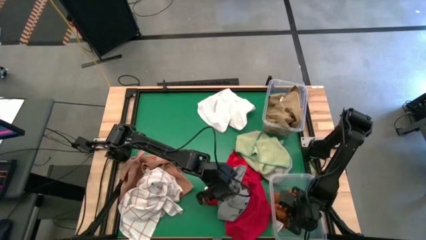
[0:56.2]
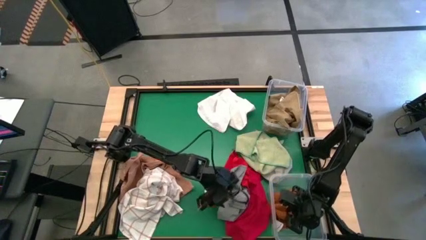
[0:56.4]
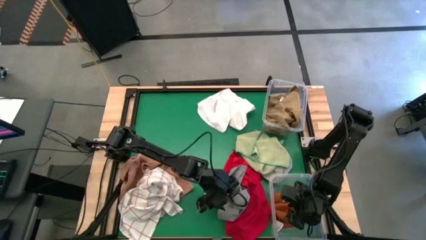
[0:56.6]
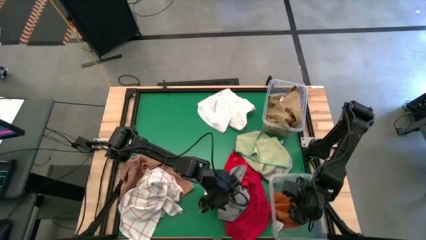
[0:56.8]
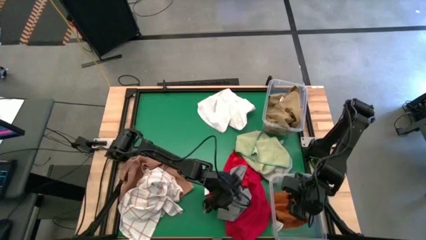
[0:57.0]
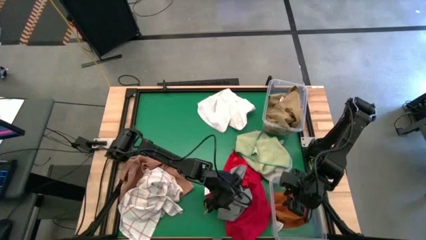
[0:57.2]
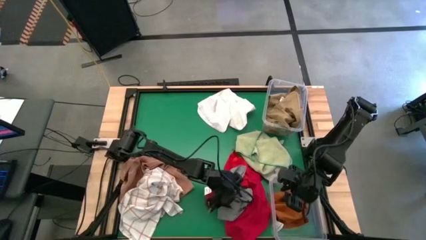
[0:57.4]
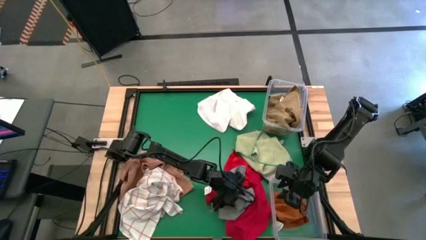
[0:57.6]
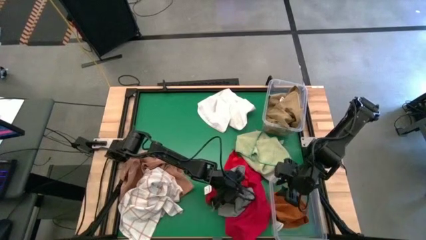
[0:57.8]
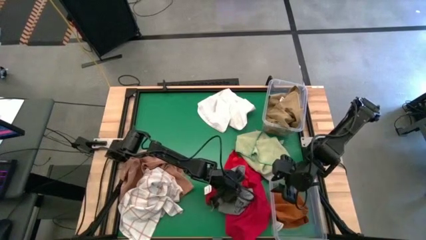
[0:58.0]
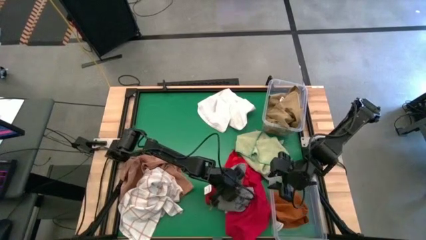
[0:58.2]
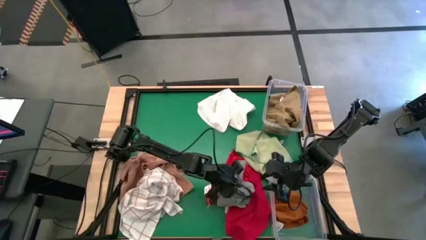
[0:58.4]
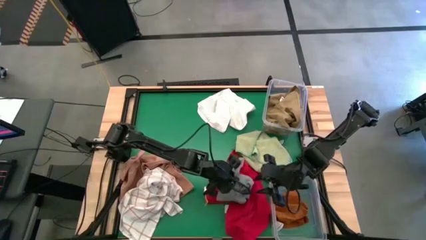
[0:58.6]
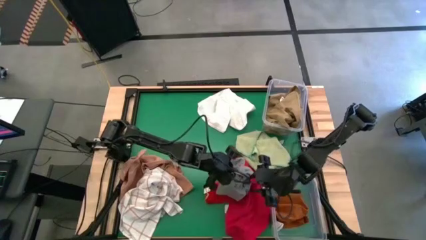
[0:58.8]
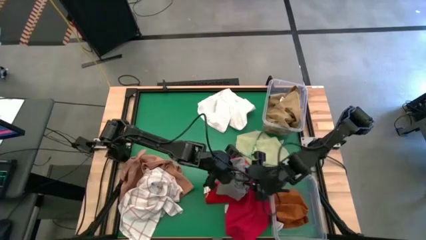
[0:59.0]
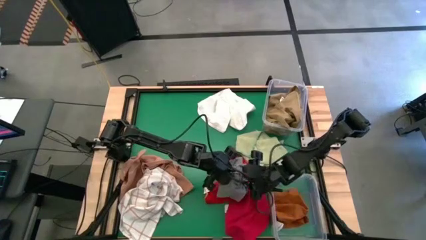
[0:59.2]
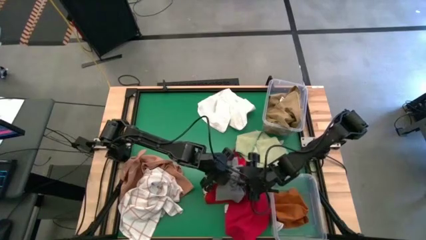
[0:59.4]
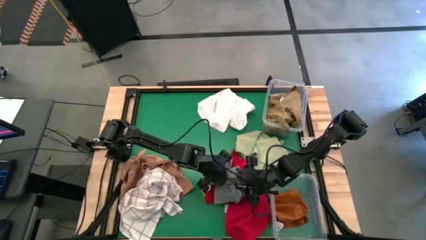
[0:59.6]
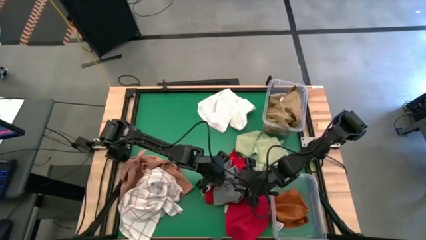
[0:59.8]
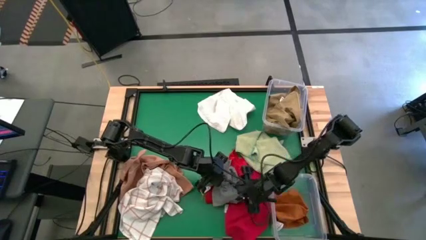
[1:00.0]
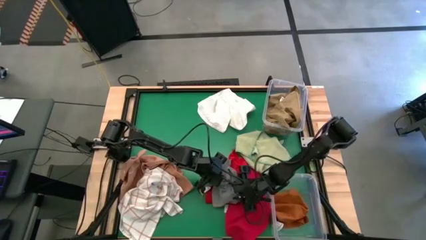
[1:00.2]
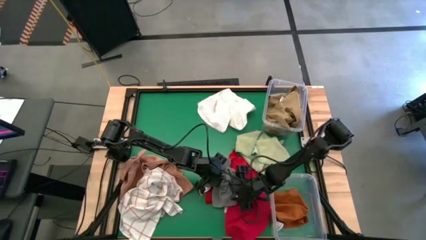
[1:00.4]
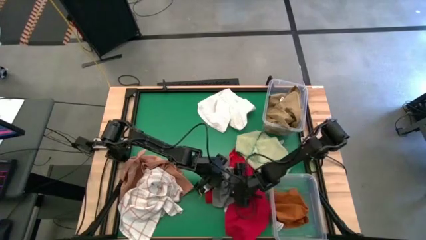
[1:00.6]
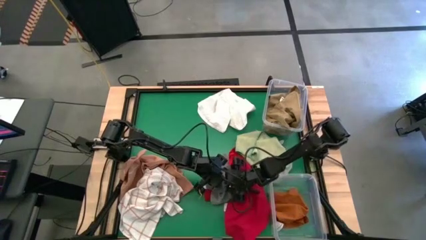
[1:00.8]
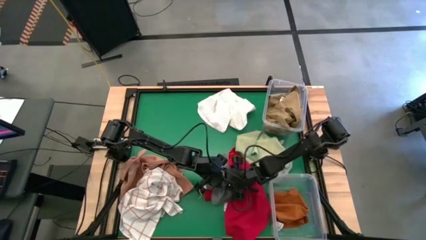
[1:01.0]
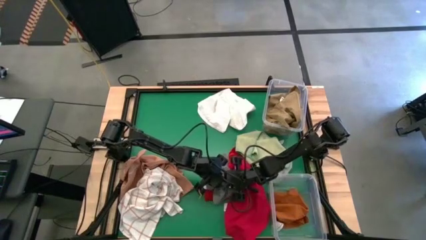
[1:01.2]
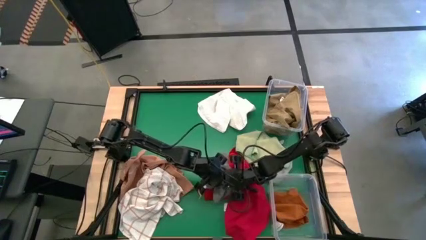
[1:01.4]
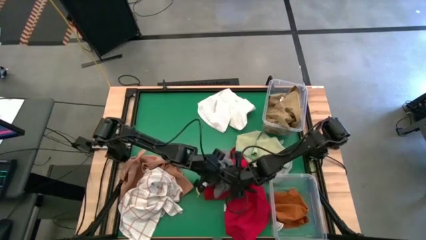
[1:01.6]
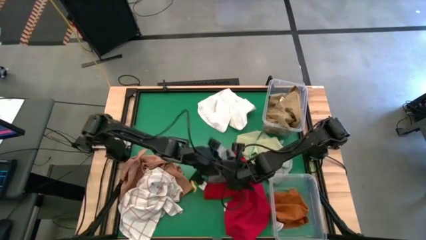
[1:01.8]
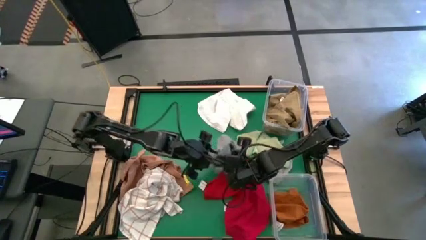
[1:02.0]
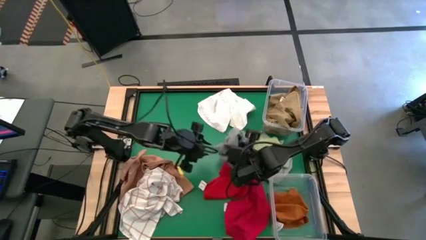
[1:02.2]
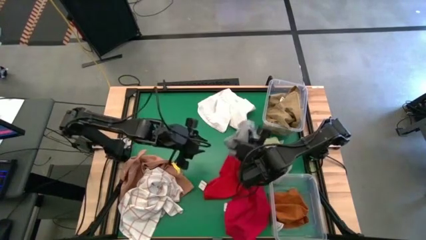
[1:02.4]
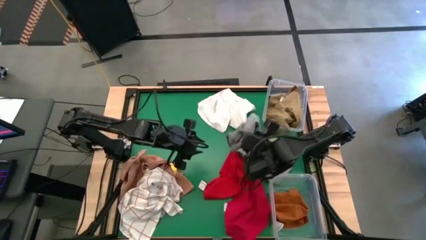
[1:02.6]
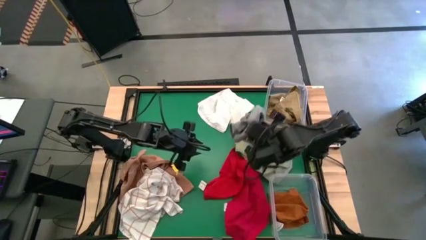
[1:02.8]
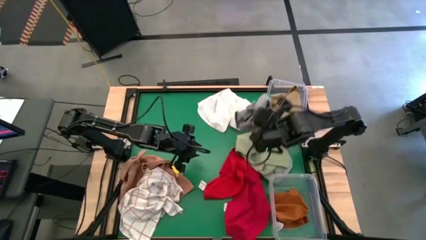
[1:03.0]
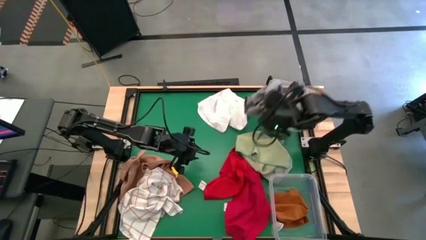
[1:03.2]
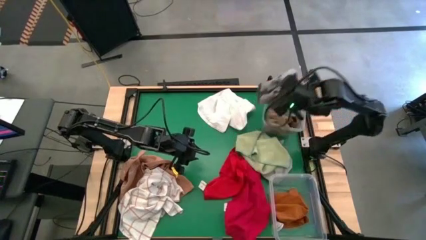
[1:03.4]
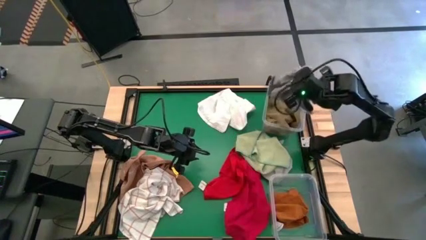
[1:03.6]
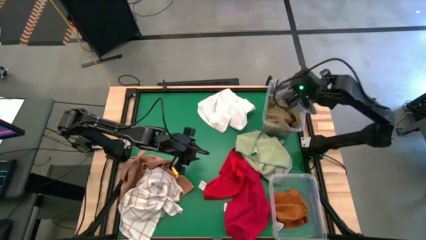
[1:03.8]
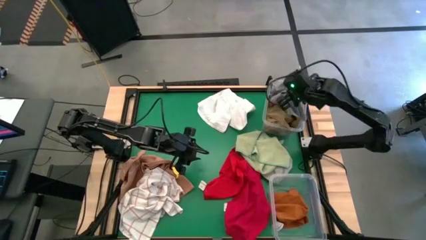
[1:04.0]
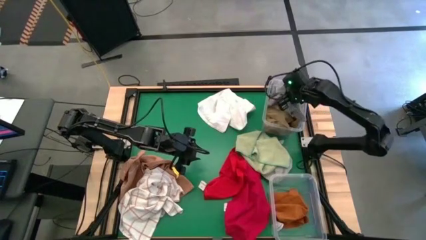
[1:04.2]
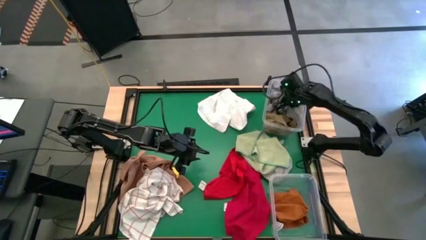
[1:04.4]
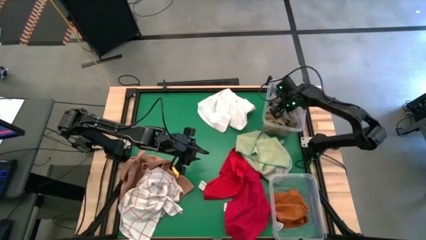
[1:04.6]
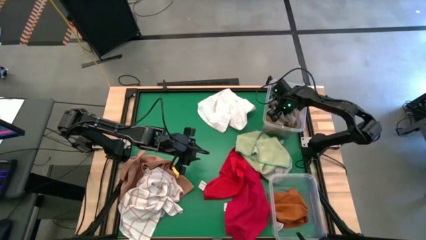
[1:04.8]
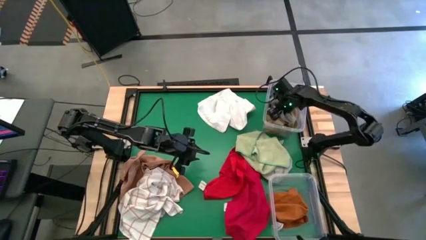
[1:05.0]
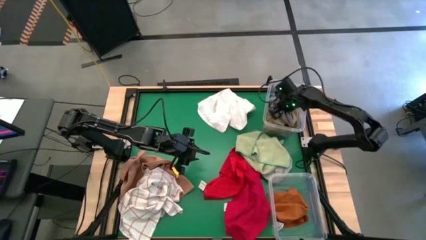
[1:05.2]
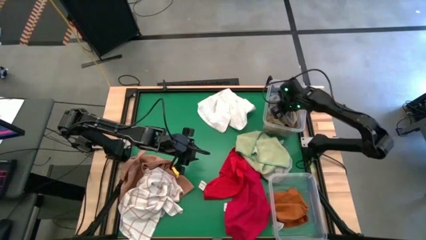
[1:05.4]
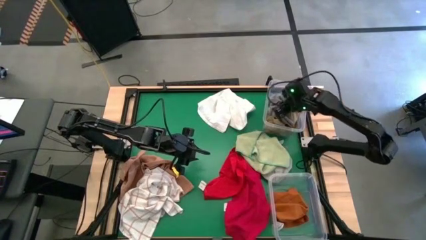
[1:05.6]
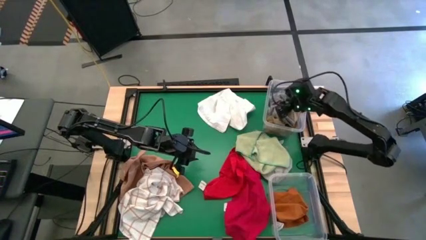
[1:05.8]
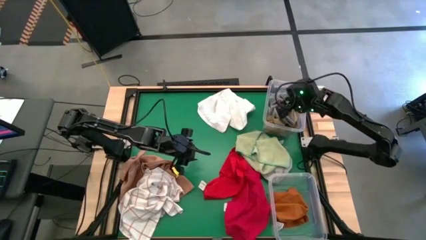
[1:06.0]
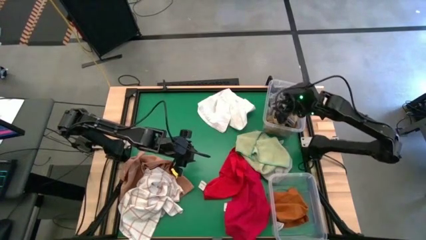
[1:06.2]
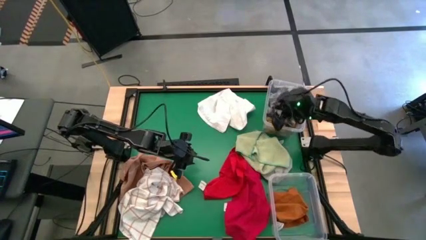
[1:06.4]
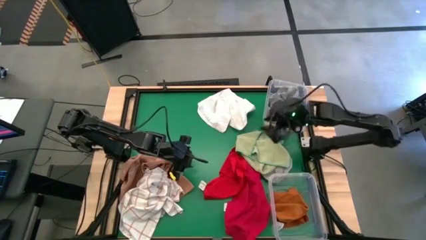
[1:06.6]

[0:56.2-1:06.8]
Task: Sort towels by color in basket
Put the left gray towel into the top transparent bin

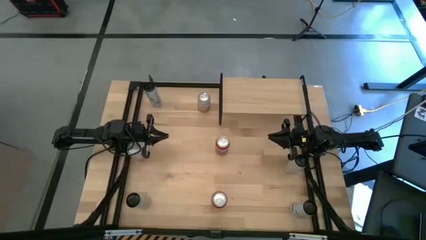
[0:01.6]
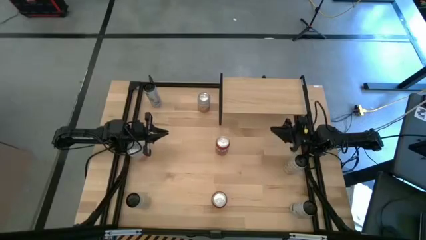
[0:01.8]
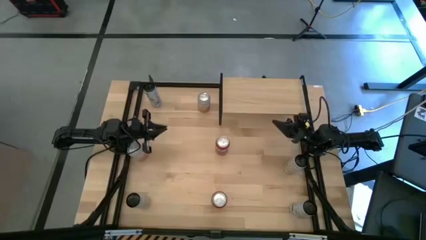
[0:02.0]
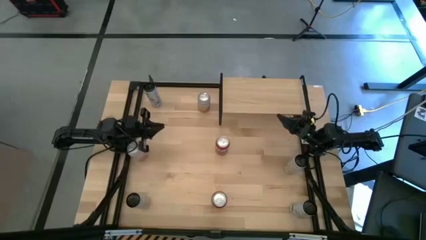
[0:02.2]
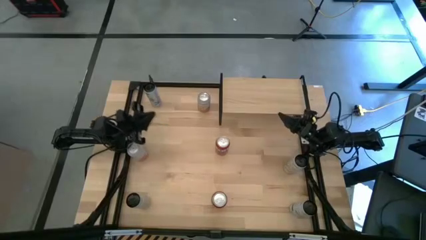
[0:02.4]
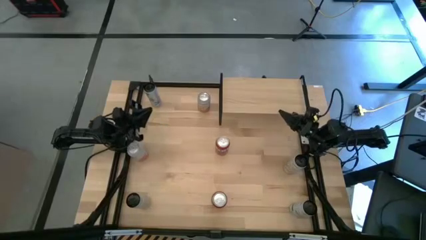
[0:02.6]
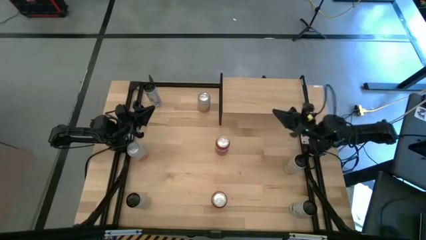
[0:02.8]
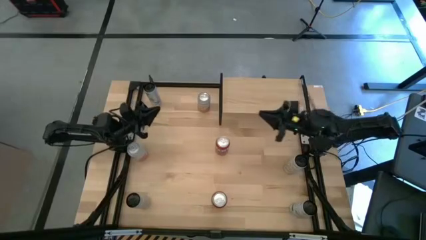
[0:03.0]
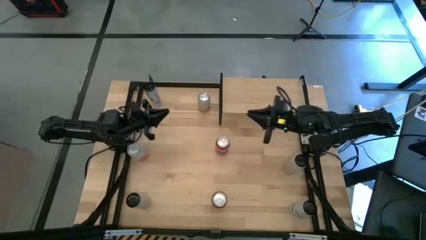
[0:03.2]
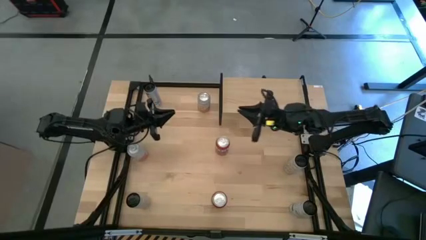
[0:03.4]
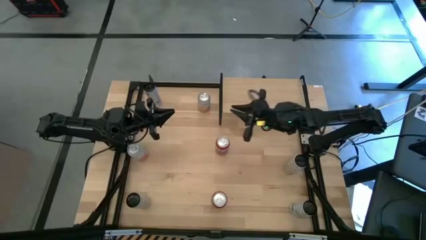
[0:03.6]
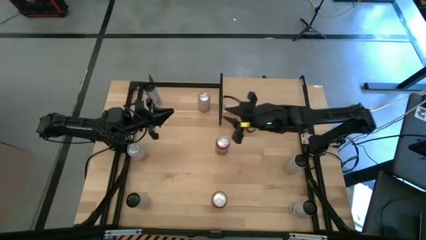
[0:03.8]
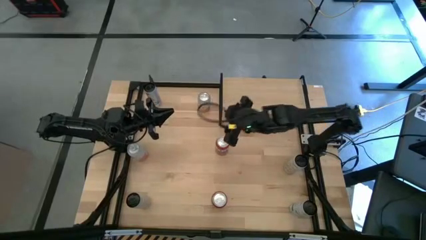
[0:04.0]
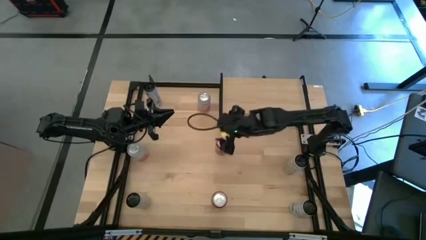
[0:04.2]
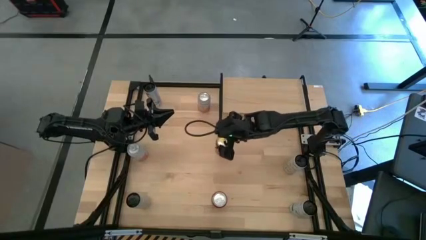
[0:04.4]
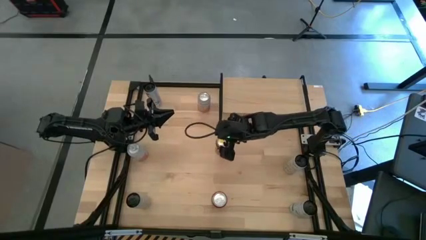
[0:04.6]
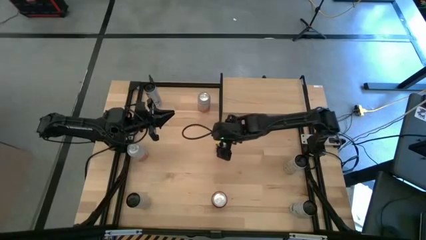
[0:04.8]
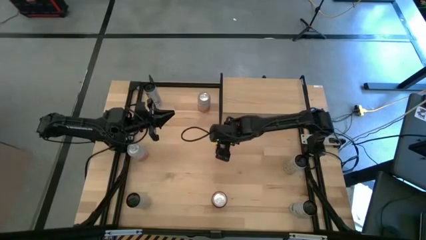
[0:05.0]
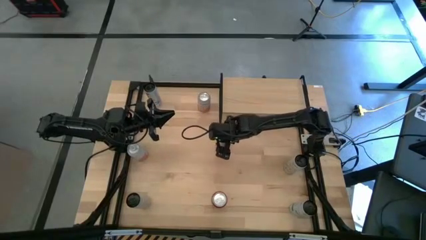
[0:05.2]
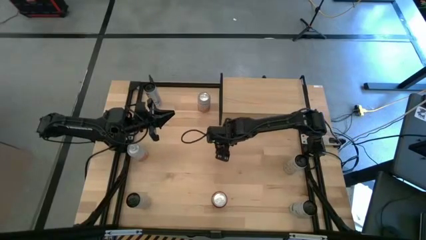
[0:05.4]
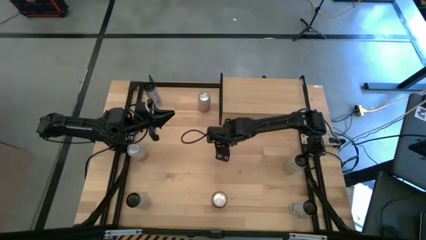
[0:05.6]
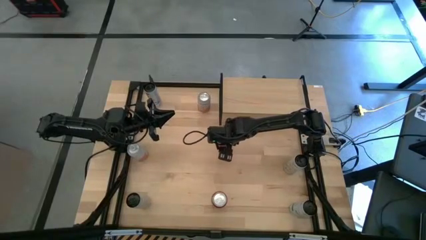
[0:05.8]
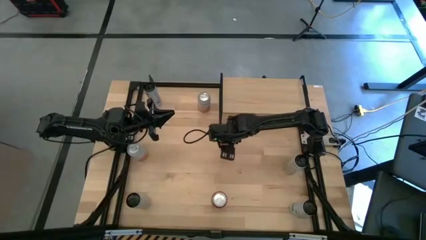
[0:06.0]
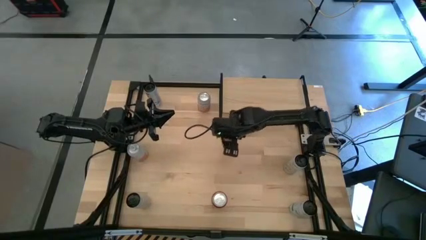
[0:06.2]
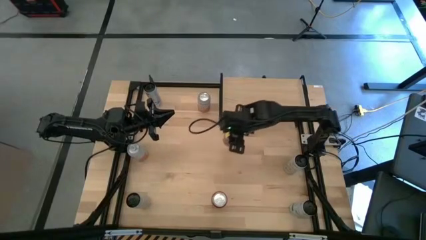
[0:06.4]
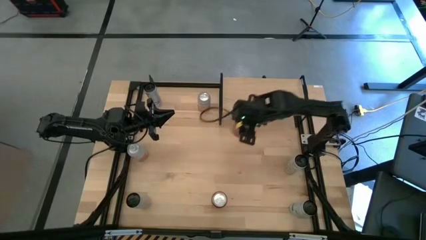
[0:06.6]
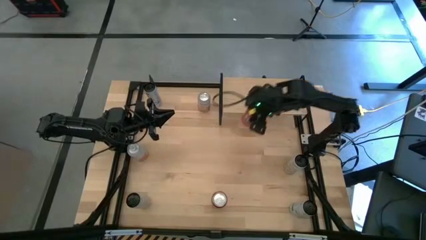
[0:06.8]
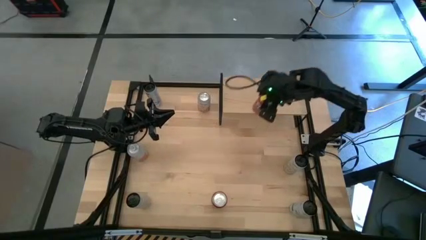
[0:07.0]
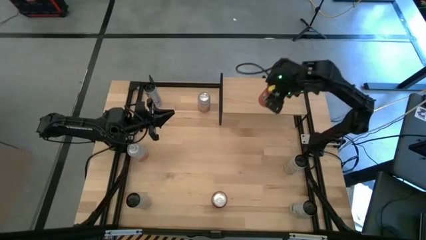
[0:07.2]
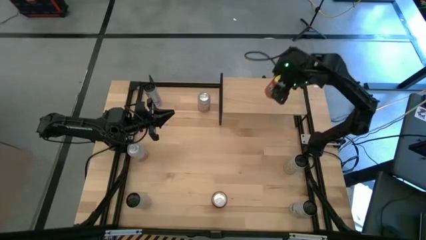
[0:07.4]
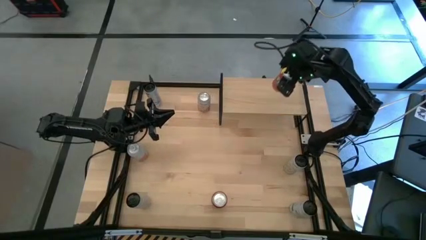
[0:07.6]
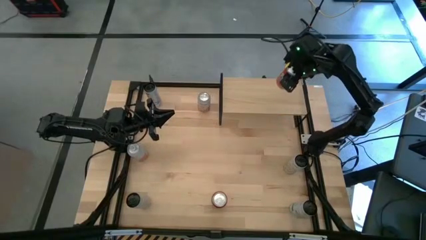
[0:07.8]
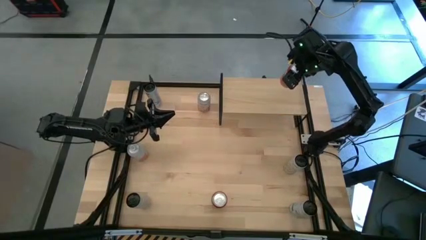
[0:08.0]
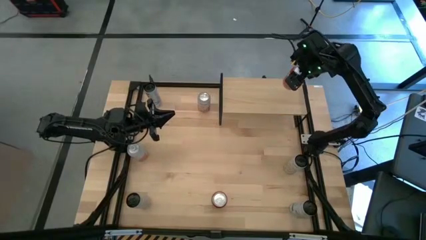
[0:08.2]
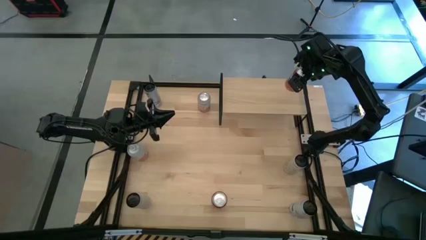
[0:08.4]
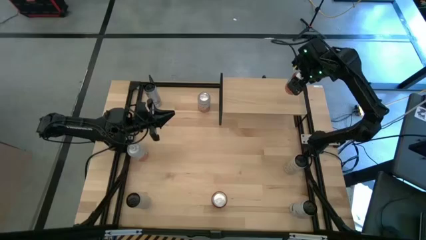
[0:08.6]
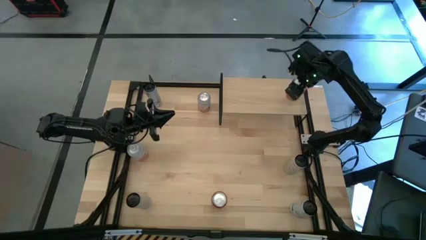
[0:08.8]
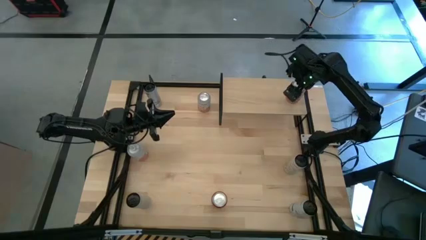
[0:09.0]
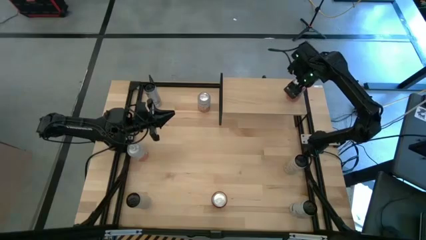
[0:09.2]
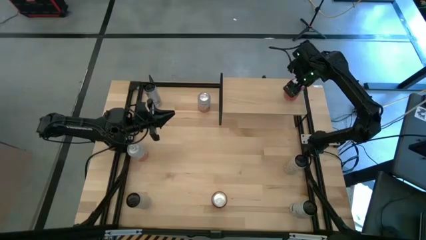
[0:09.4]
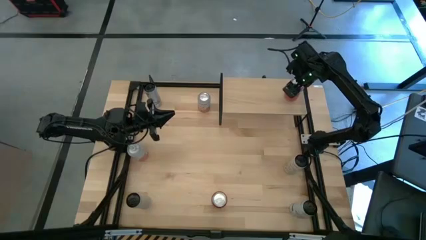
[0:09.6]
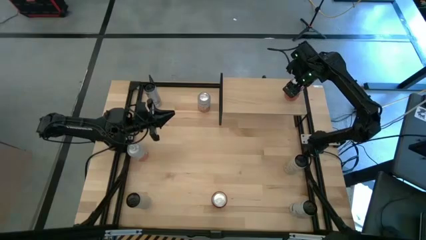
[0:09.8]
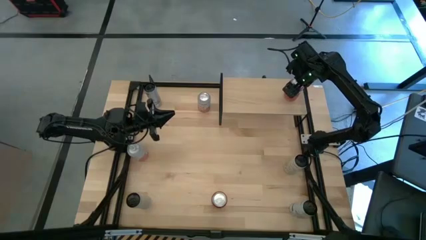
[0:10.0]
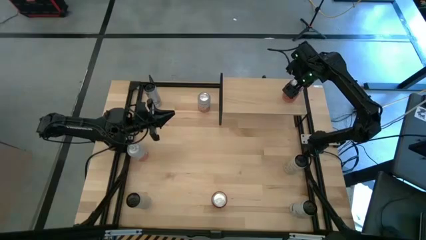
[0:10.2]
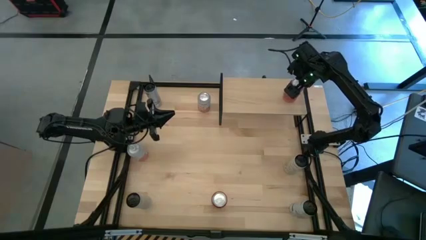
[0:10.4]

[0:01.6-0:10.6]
Task: Place canned beverage on shelf
Put the top red soda can on the shelf
